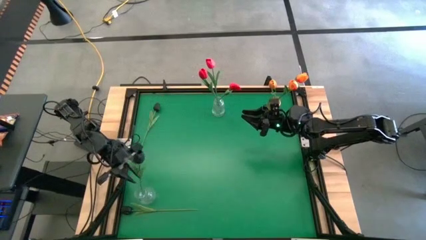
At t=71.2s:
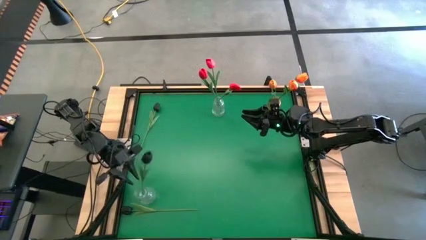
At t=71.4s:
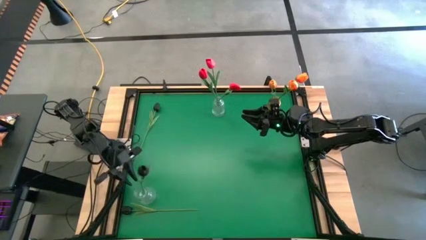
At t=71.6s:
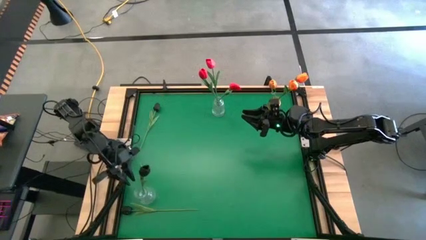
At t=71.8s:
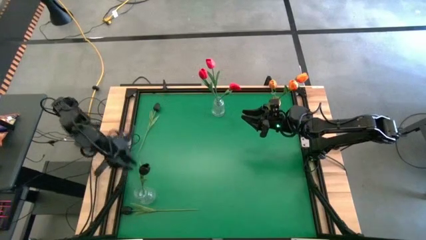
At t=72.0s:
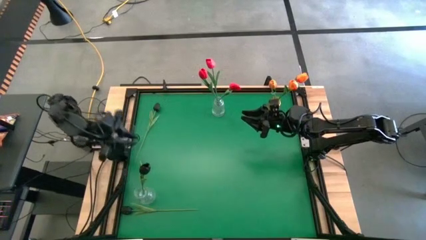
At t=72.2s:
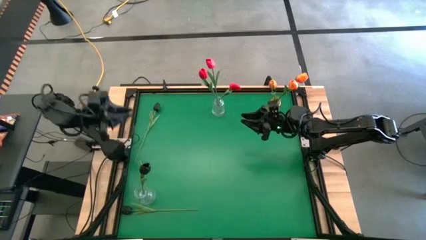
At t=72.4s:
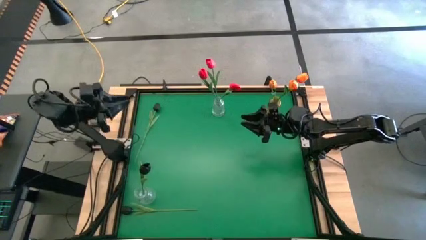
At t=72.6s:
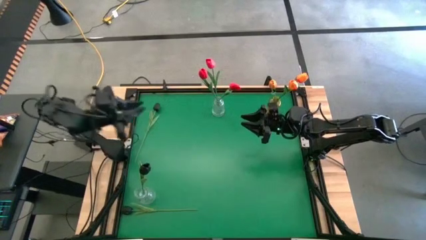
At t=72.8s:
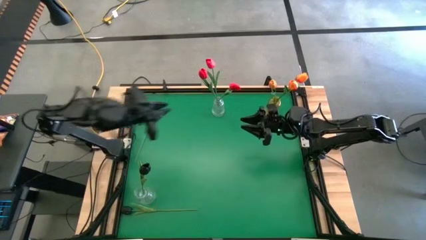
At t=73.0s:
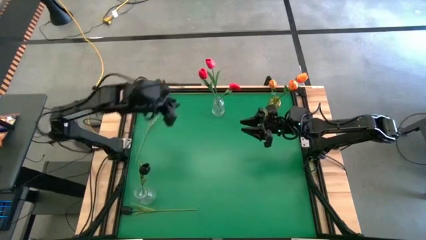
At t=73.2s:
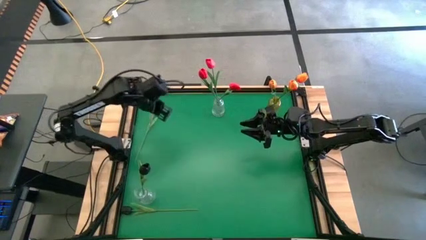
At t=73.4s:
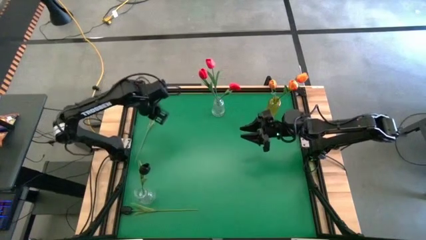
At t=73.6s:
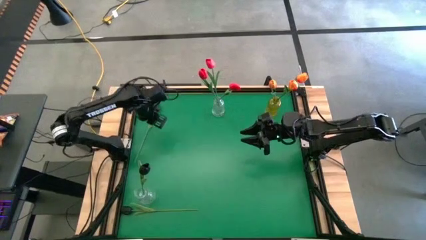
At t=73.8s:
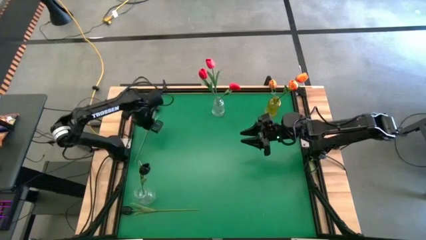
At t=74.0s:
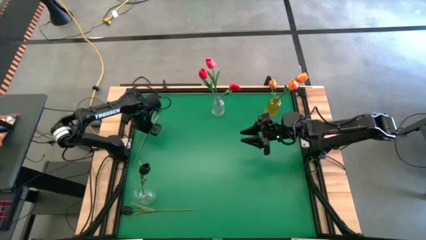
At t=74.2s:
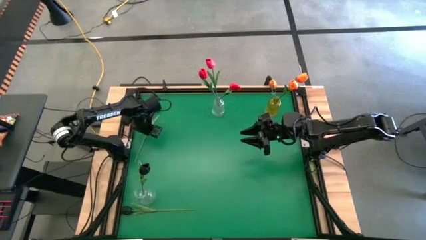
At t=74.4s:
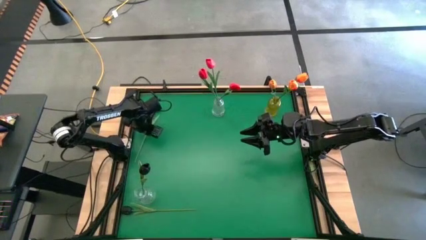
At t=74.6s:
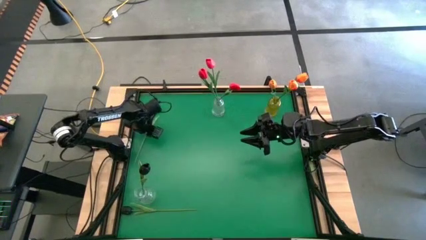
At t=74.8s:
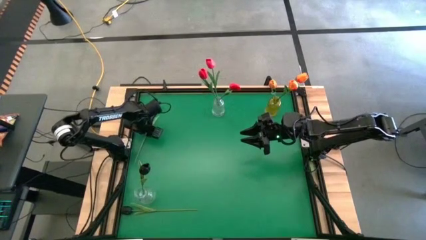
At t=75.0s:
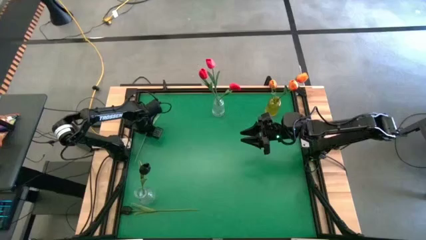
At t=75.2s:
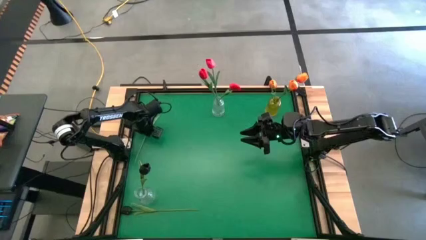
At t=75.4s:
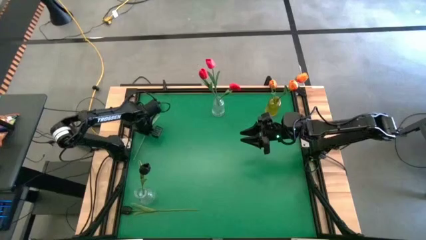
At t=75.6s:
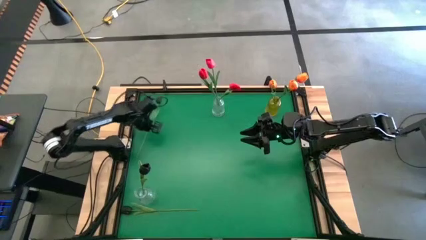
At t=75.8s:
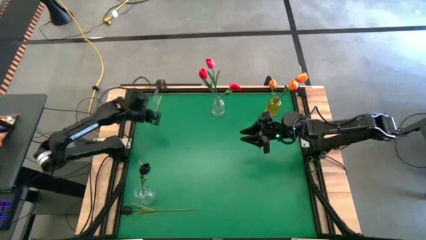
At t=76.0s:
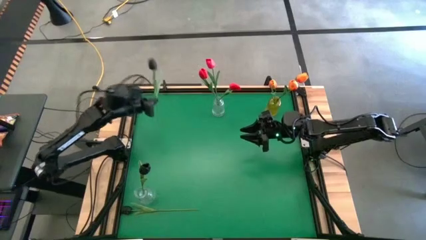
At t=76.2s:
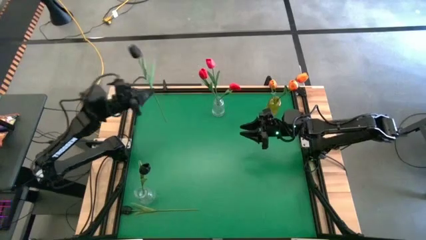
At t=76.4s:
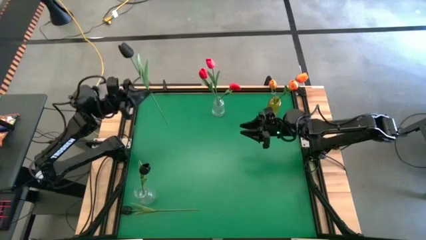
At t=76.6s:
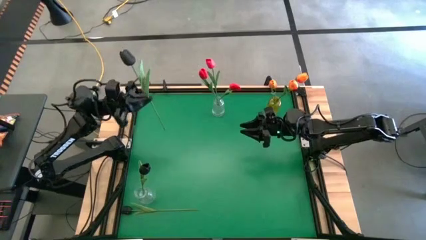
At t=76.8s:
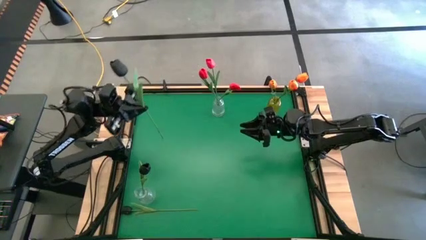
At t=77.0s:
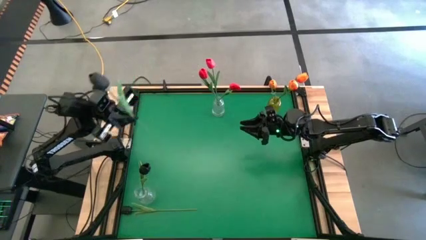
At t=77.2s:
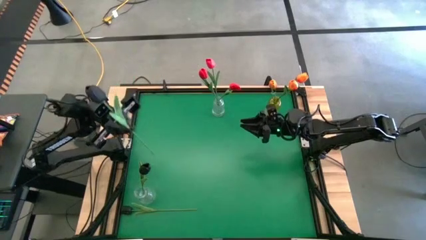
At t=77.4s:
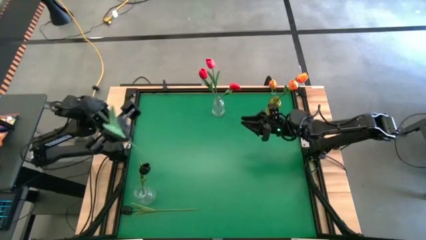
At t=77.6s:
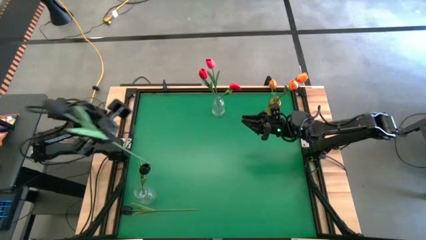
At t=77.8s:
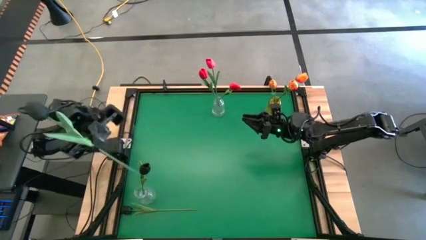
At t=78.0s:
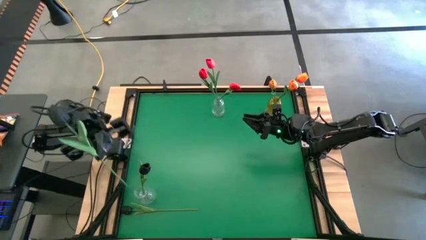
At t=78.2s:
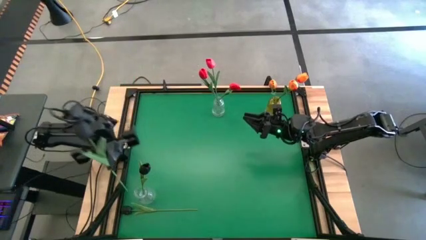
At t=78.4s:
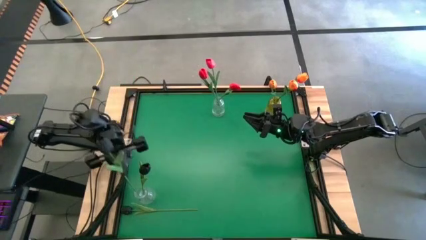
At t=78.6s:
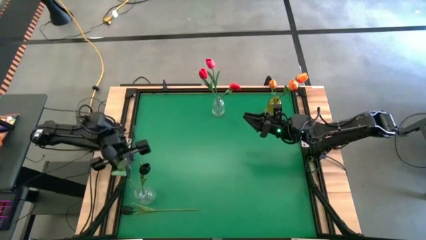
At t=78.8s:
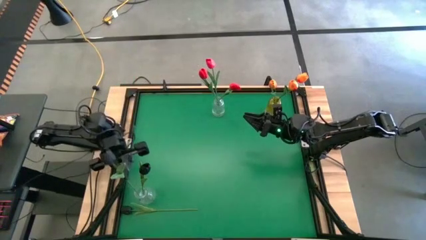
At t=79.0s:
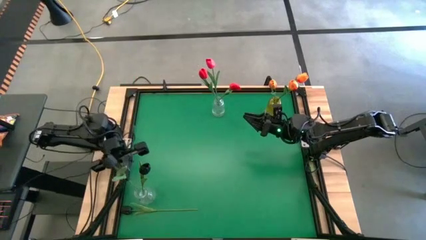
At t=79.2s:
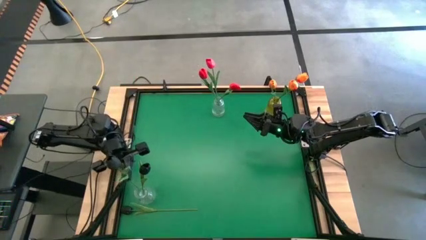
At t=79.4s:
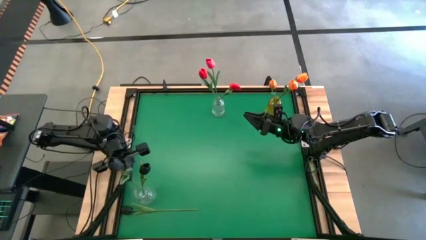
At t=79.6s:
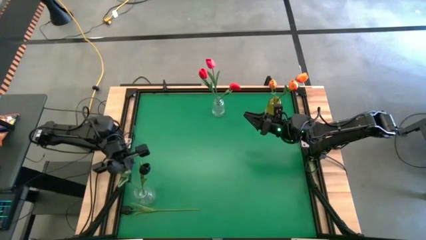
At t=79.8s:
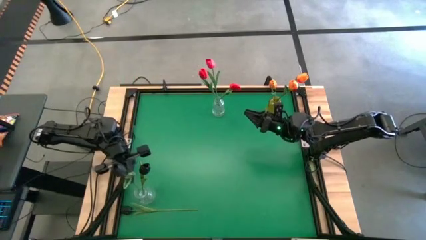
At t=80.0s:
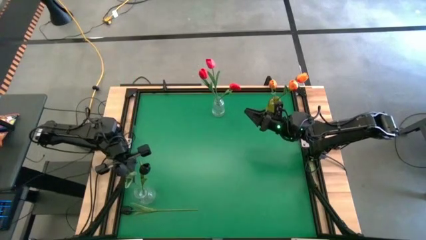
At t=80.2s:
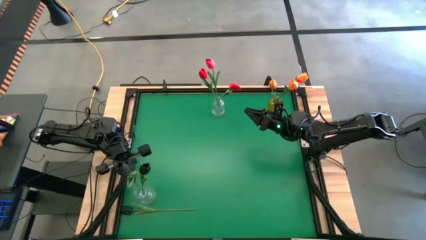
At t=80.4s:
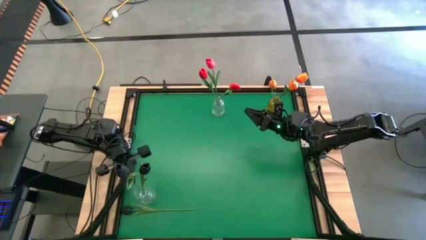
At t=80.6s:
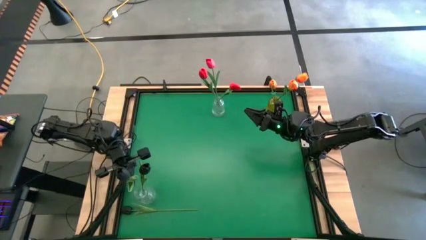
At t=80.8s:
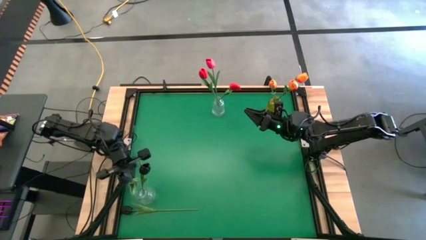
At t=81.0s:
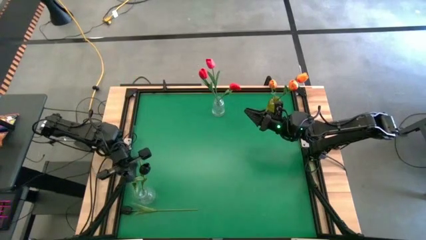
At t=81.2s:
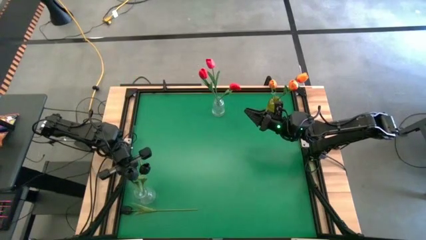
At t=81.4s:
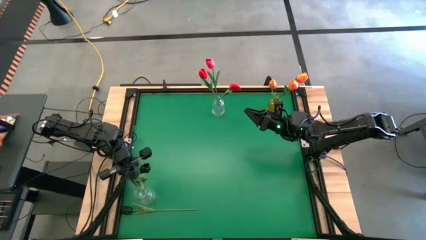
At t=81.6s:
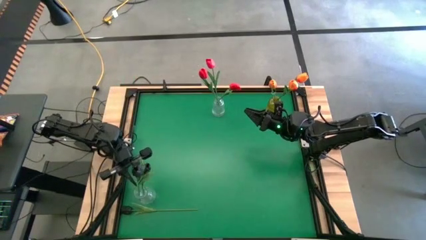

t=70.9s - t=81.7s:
Task: Sort flowers into vase by color
Put the top black flower into the bottom transparent vase
